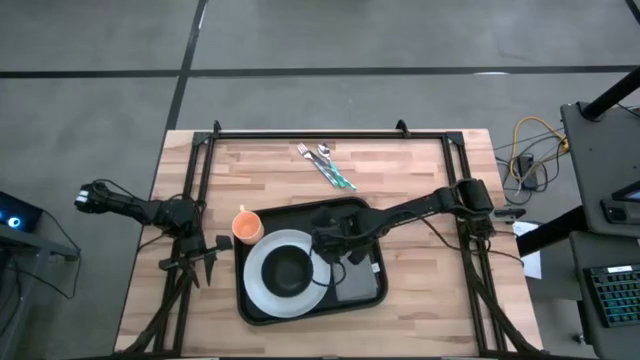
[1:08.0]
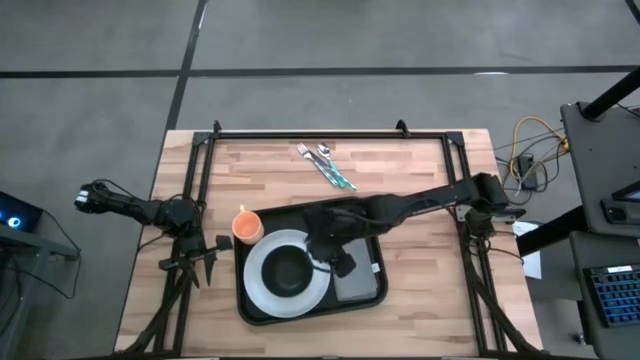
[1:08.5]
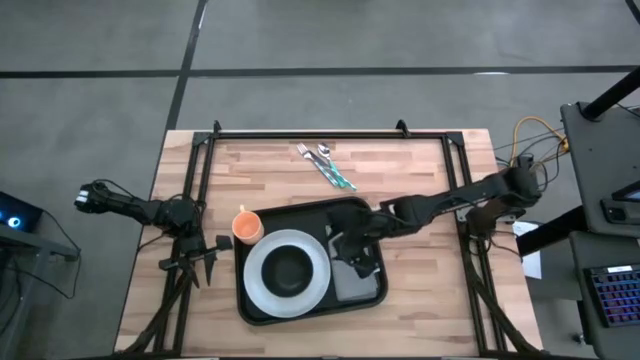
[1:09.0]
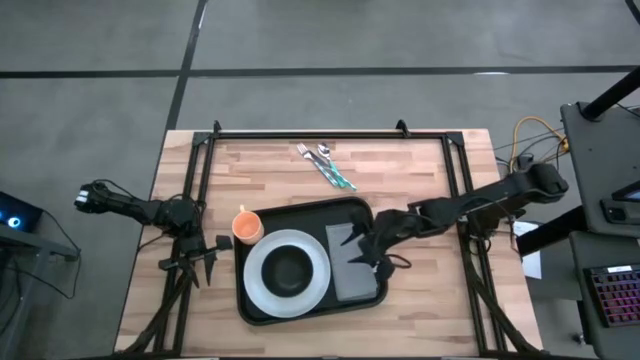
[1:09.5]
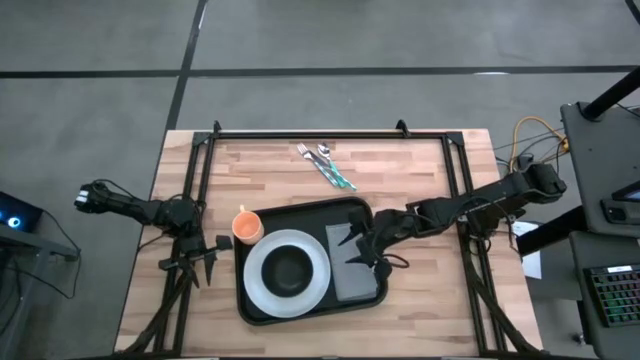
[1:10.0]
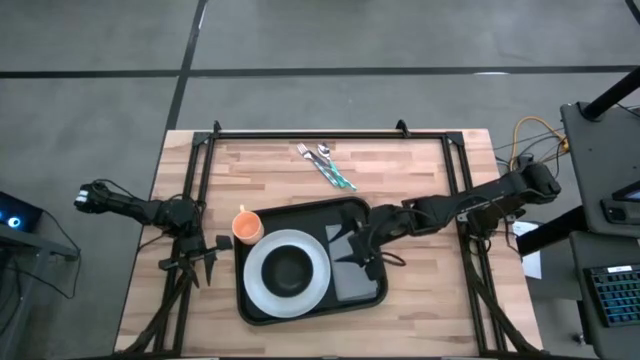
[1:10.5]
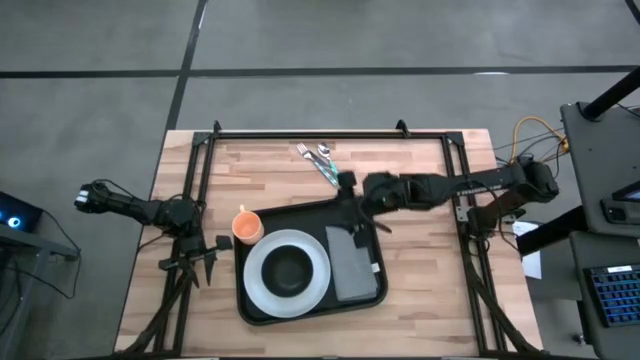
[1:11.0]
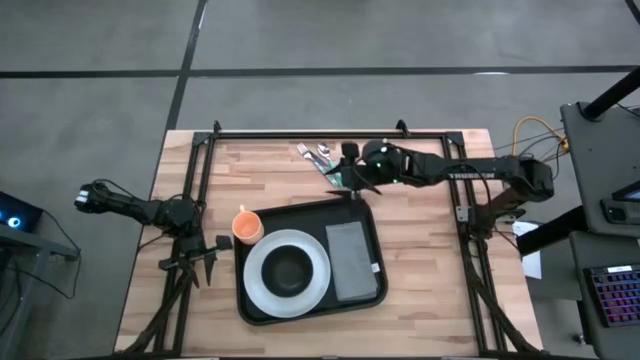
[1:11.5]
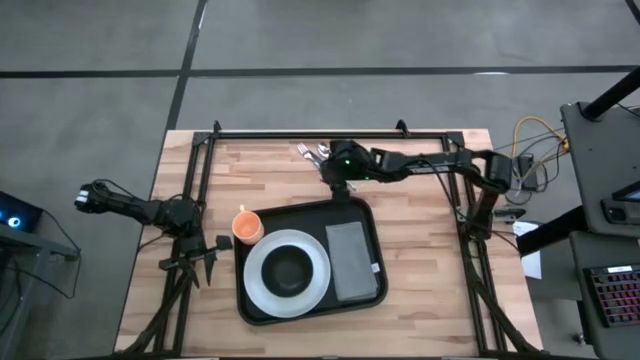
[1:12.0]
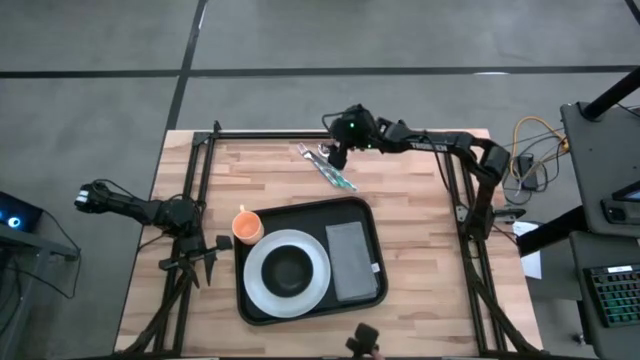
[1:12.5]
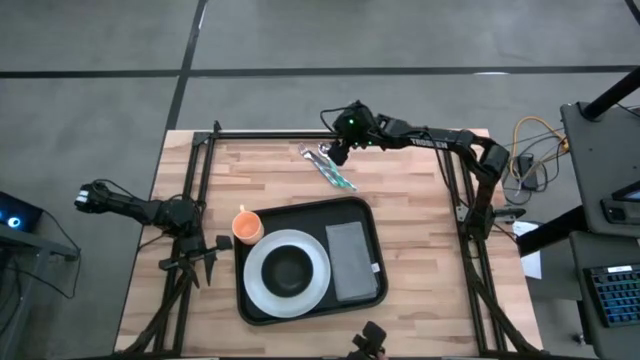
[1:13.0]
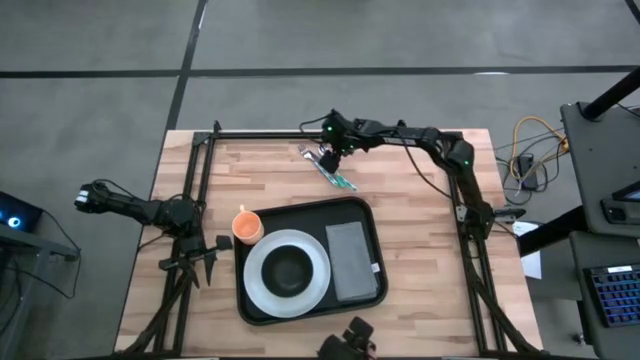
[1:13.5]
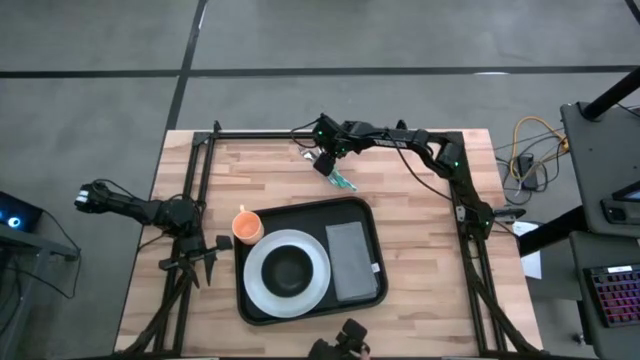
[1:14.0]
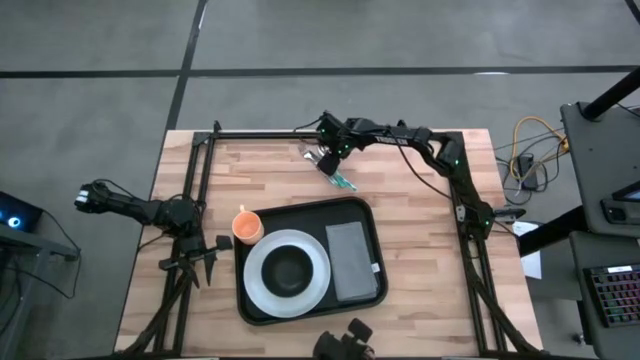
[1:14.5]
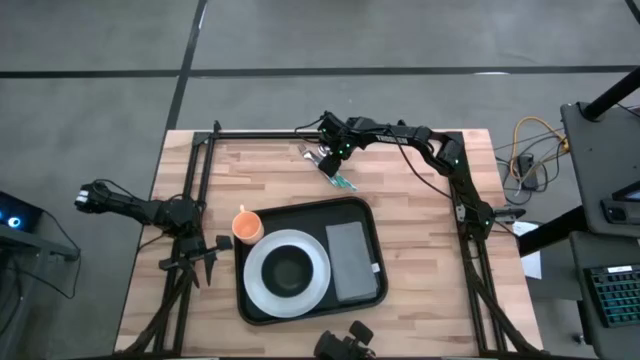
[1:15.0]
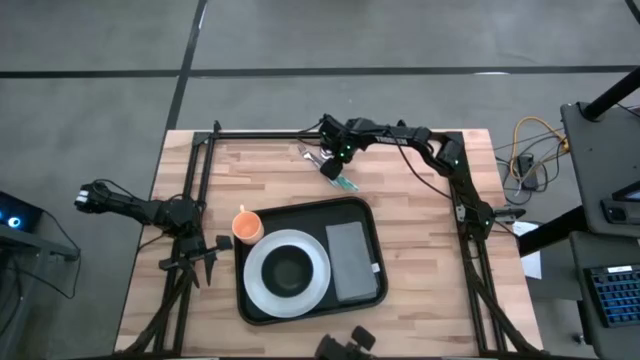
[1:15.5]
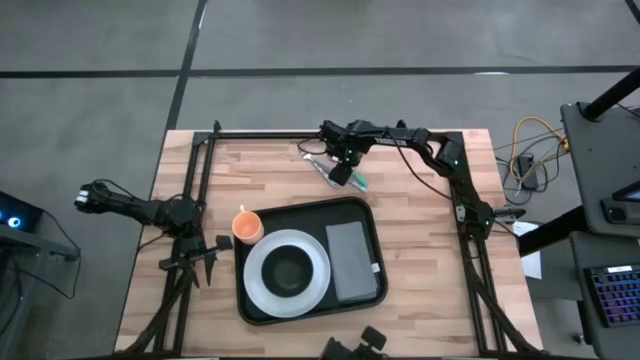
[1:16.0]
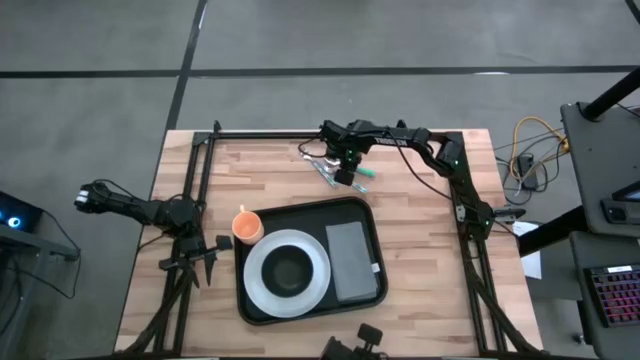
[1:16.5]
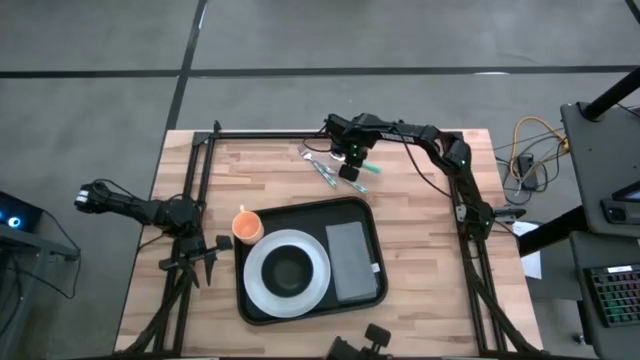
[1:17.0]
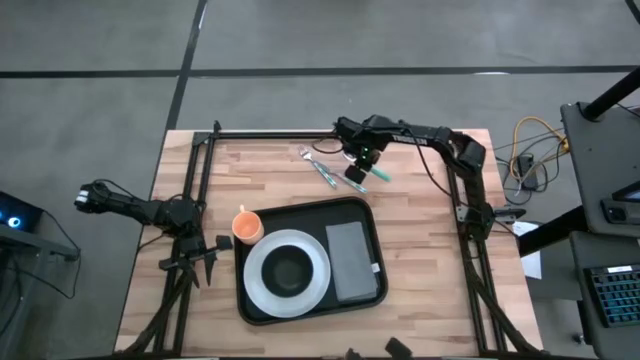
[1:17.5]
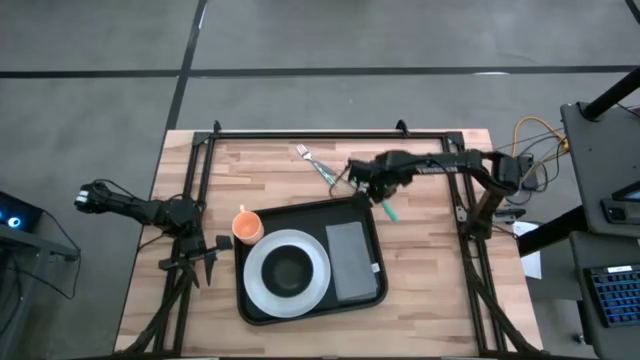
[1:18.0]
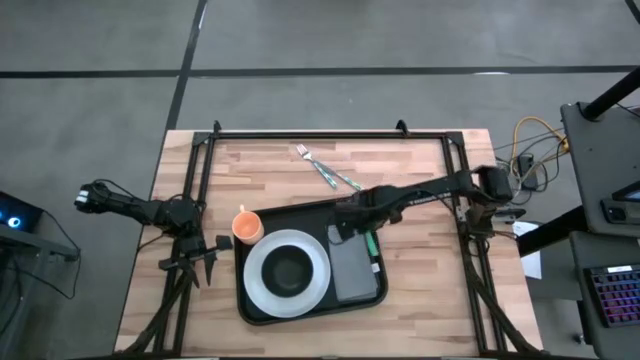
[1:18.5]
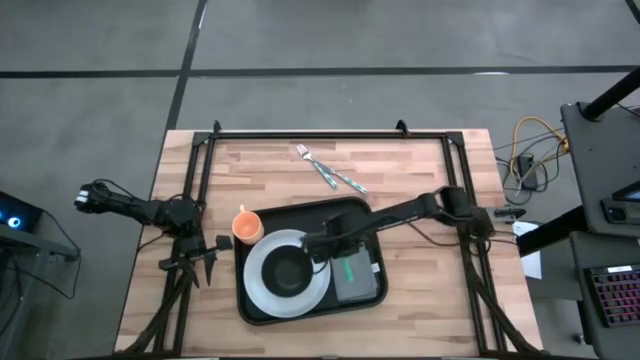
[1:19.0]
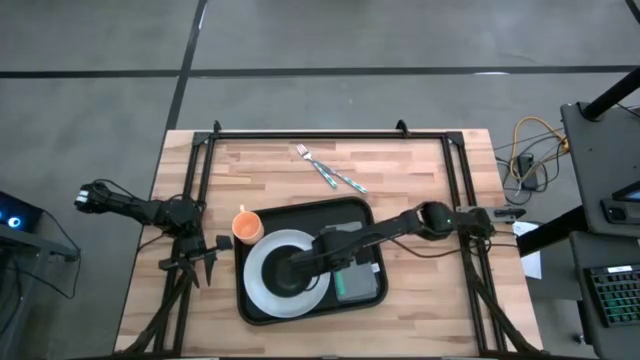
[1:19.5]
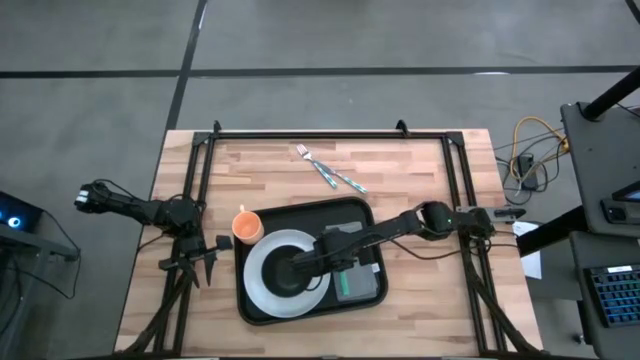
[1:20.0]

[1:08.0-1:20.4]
Task: Set up tray
Put the blue spoon on the gray napkin

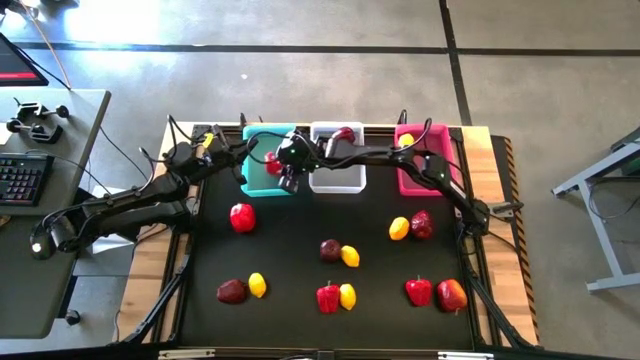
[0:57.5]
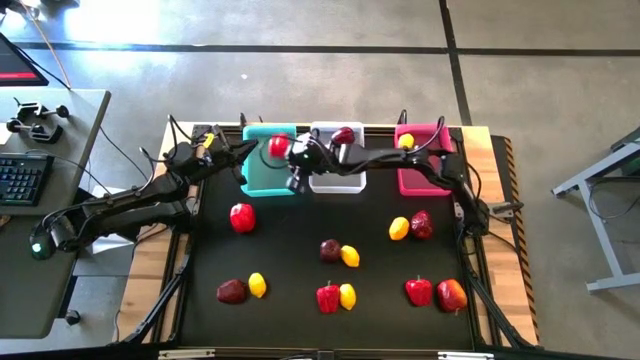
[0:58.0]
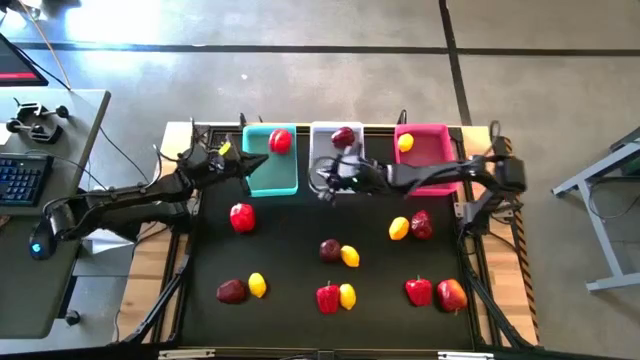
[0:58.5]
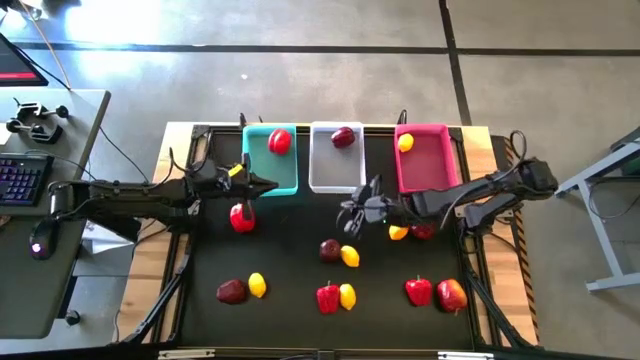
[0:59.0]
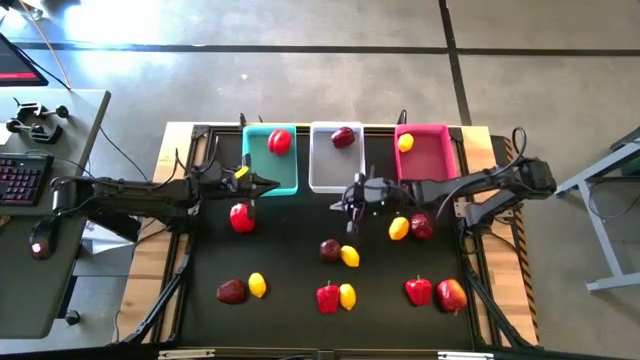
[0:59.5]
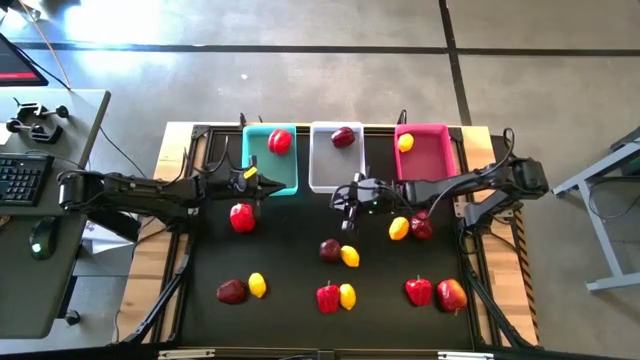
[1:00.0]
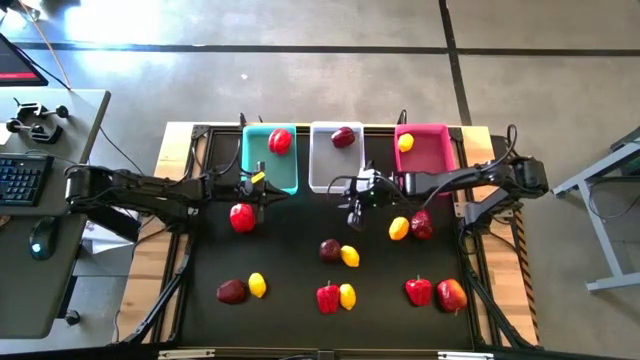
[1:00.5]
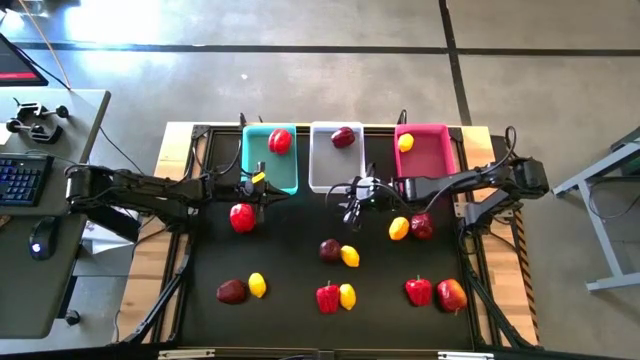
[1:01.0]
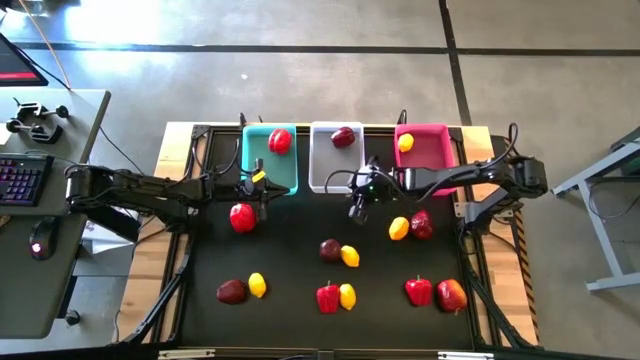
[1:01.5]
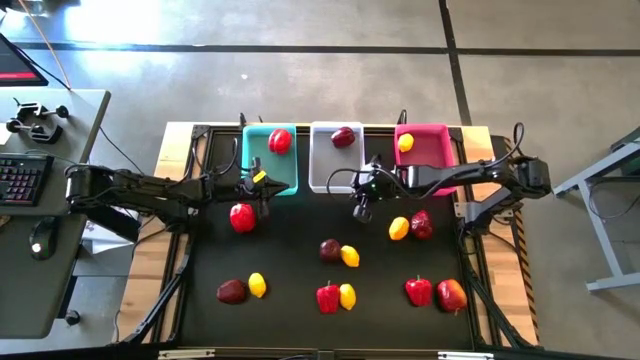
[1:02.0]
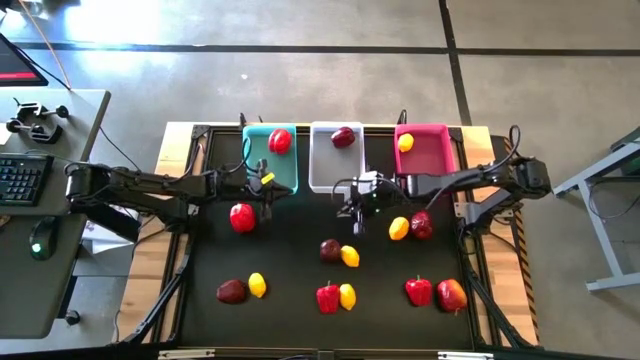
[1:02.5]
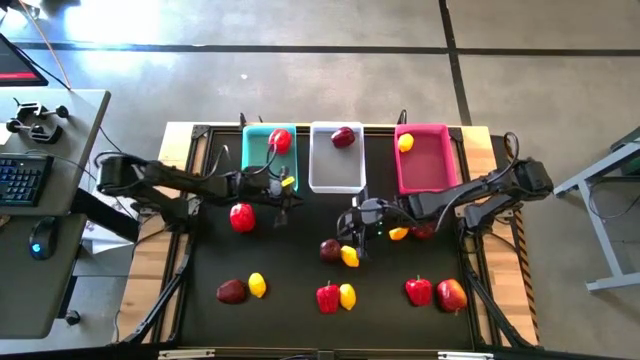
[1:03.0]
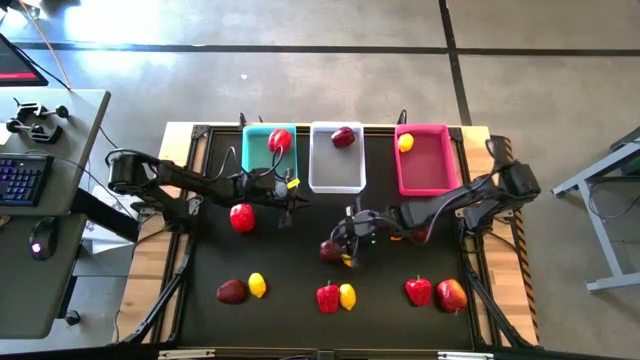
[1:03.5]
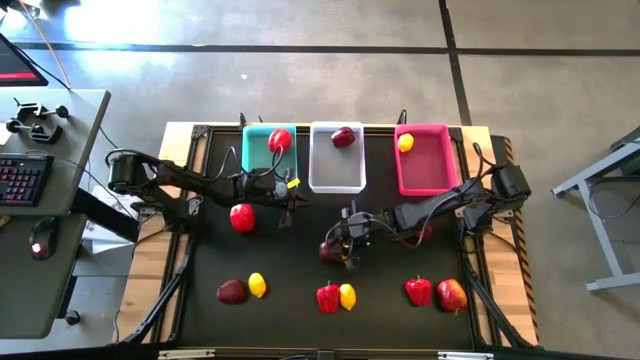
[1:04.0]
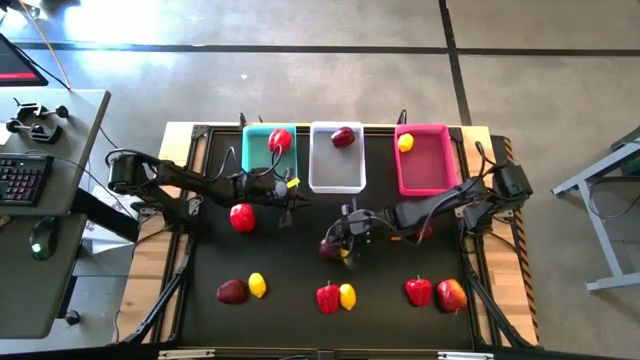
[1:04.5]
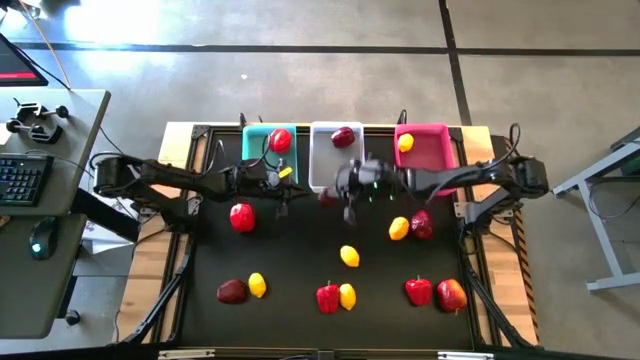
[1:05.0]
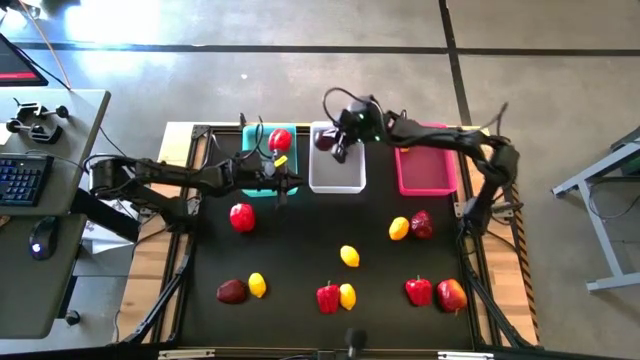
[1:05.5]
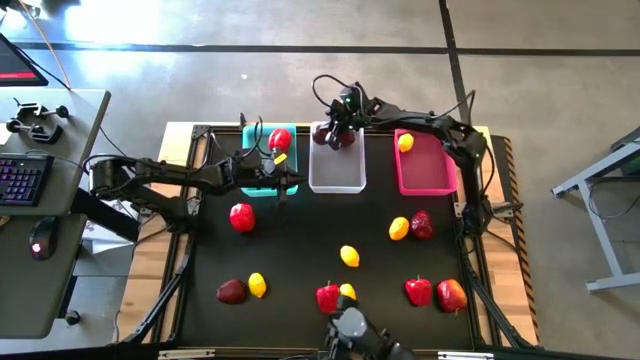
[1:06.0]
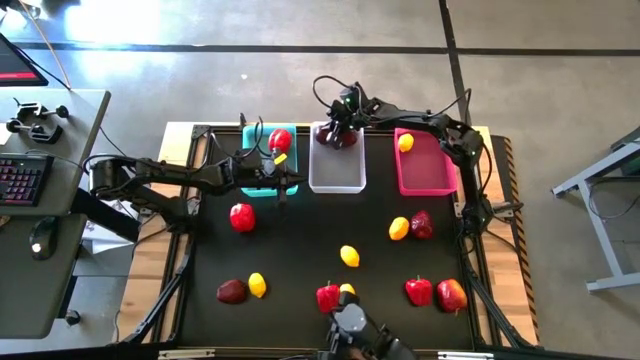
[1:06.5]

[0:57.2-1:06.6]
Task: Sort produce into baskets
Put the apple into the white bin
